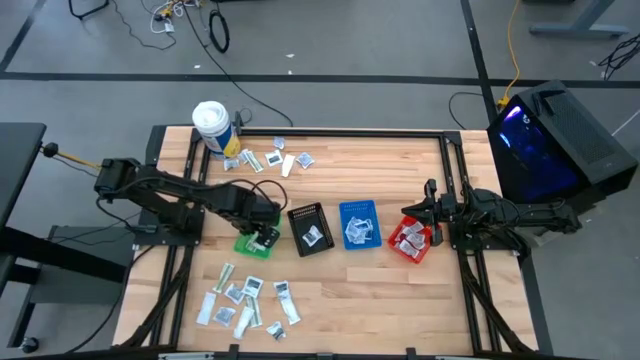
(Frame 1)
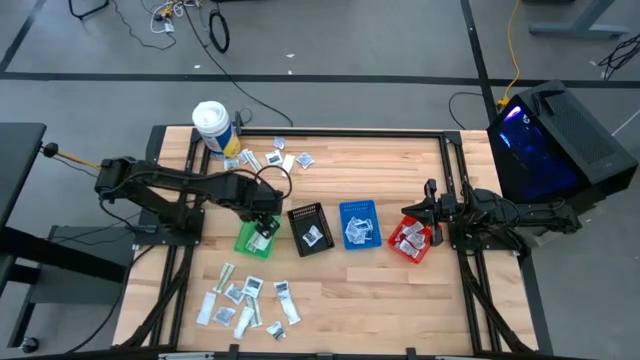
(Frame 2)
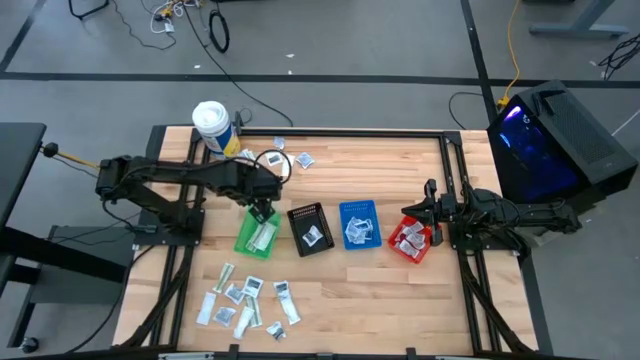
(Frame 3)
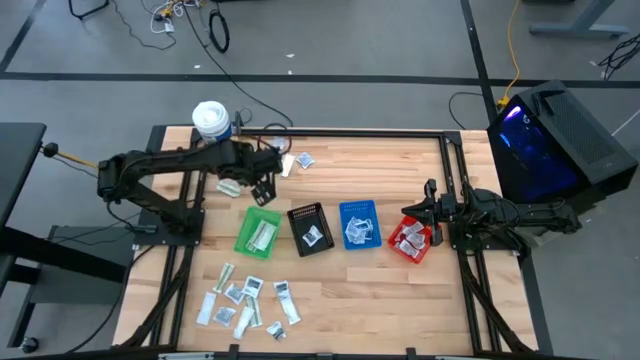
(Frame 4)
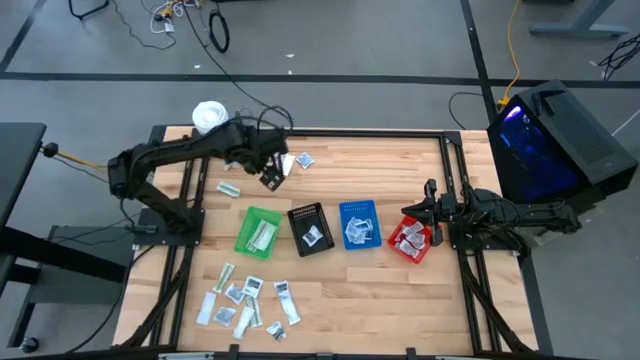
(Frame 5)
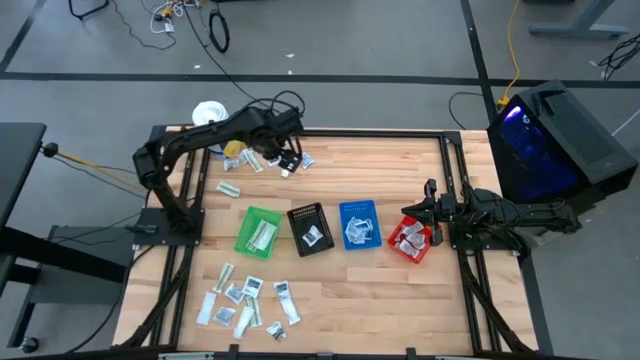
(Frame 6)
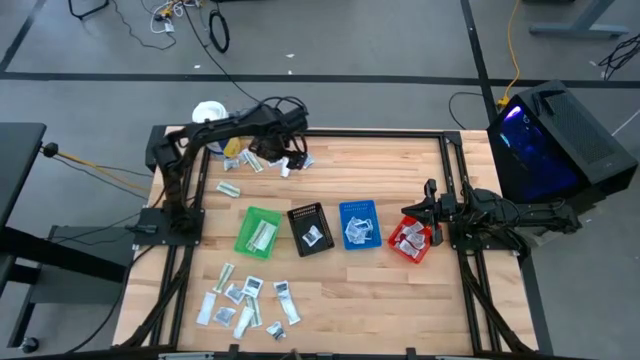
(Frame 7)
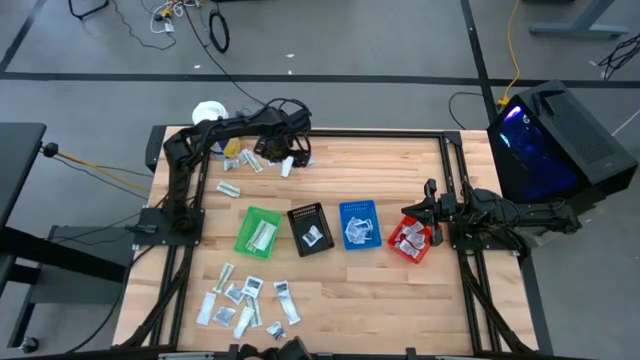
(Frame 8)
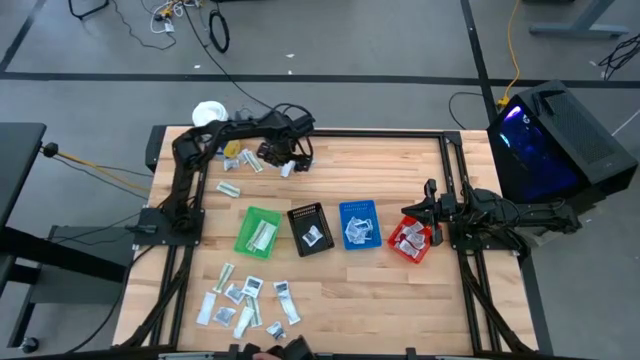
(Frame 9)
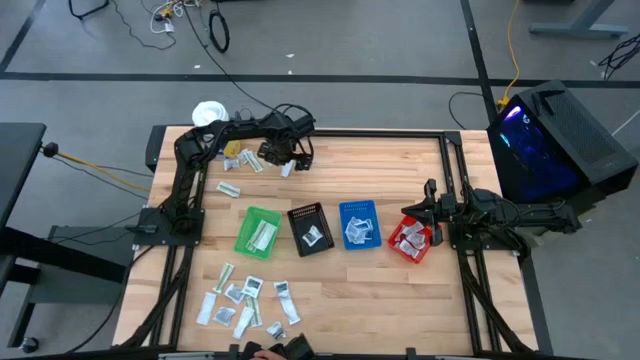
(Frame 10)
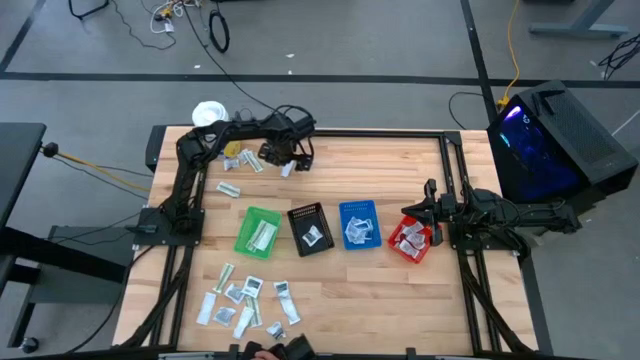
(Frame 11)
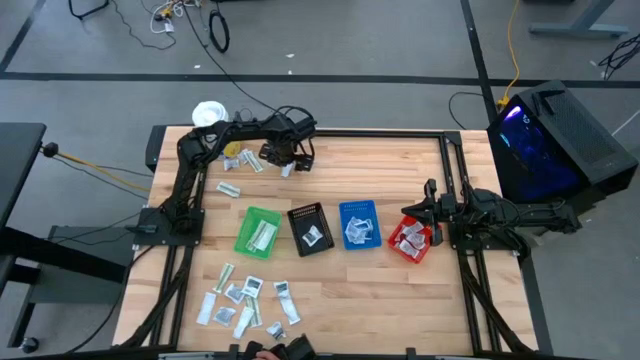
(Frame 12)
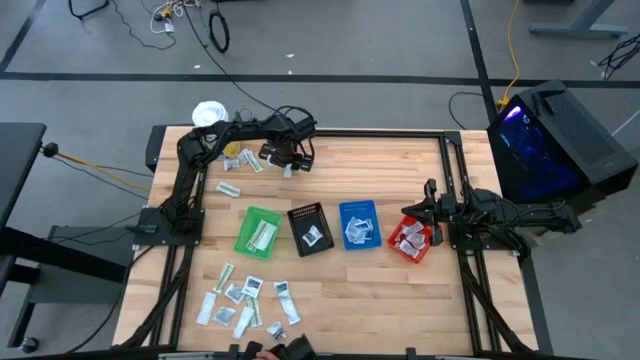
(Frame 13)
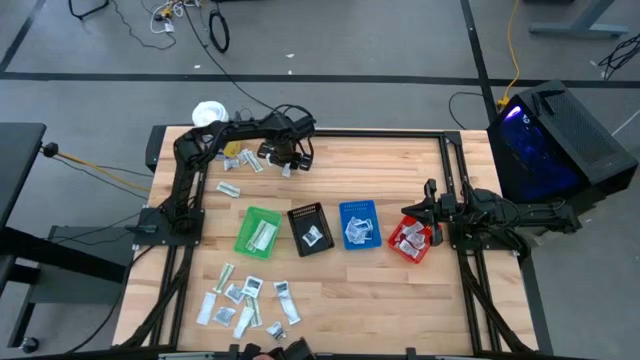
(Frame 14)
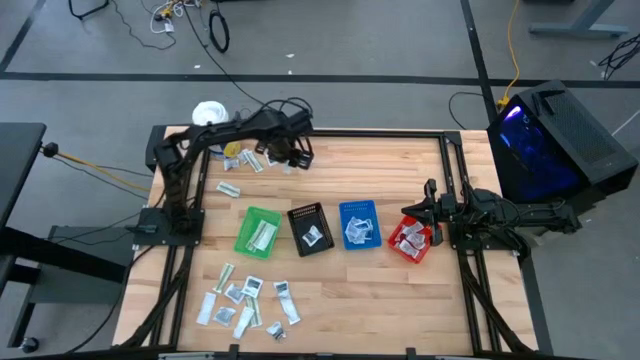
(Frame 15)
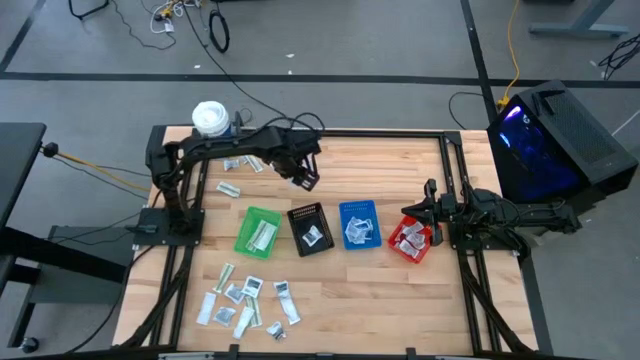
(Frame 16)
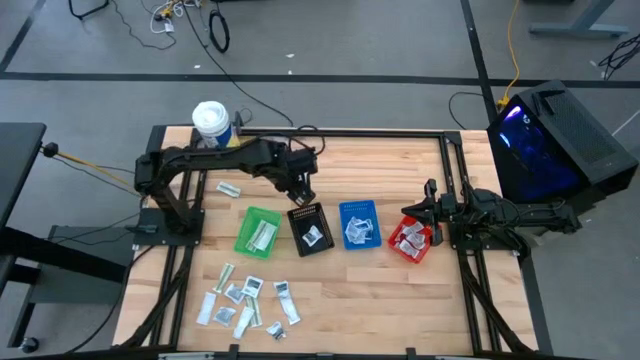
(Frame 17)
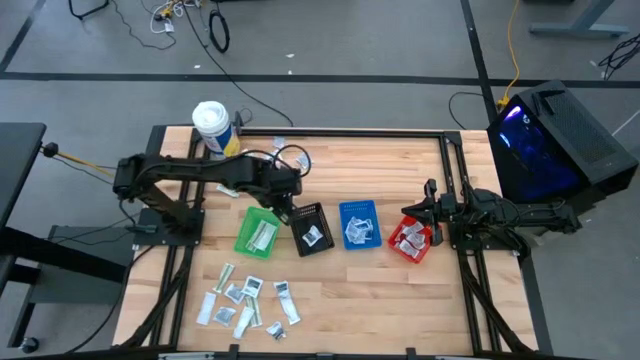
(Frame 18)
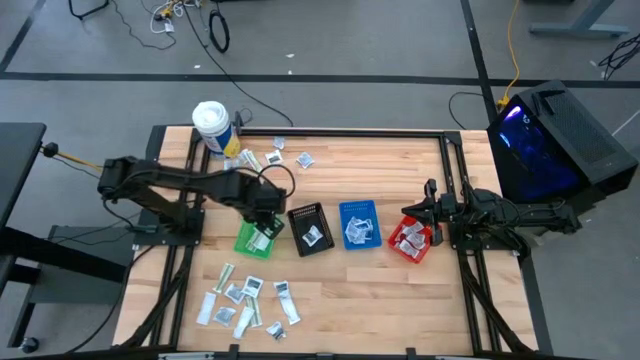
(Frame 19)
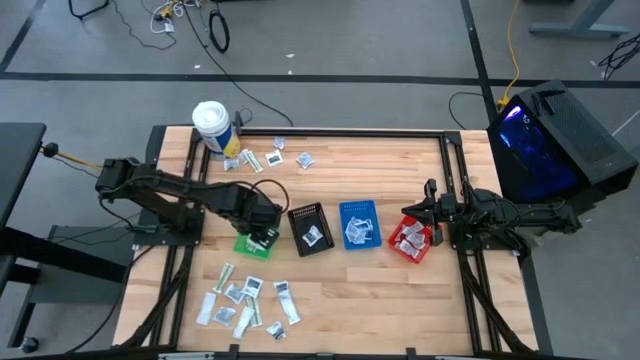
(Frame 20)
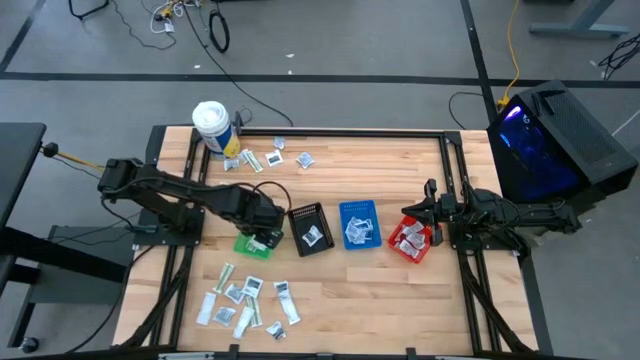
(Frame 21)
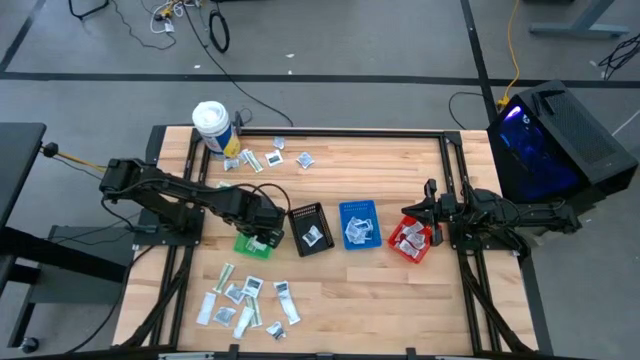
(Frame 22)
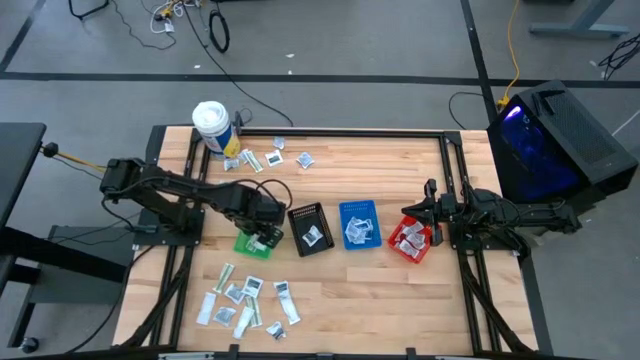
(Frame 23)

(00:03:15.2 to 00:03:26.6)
Task: Pick & Place First Aid Supplies
Put the bandage into the green basket
